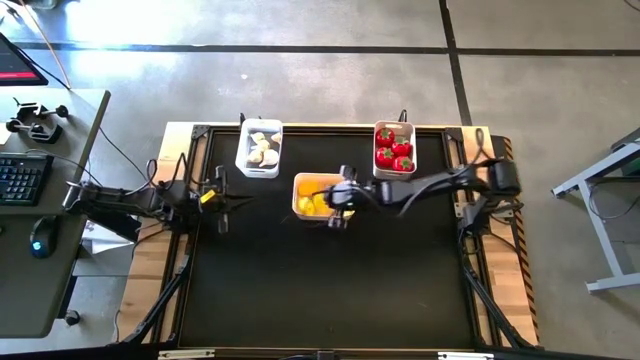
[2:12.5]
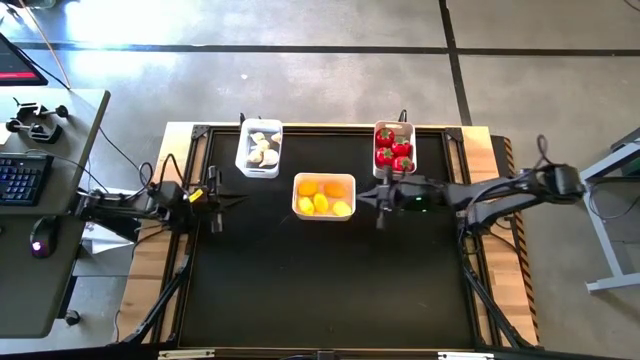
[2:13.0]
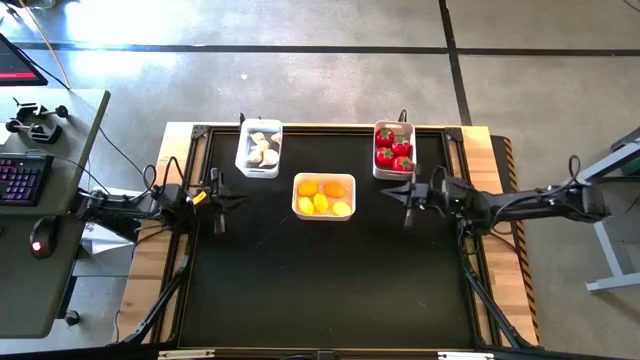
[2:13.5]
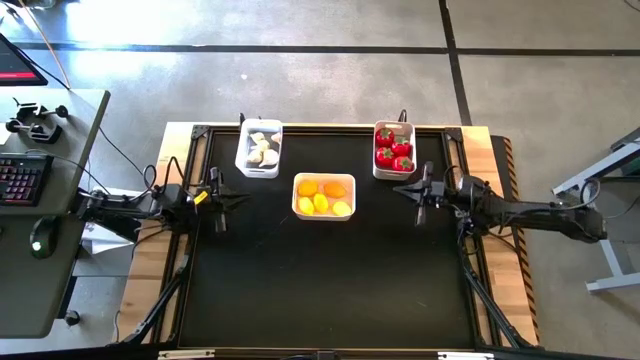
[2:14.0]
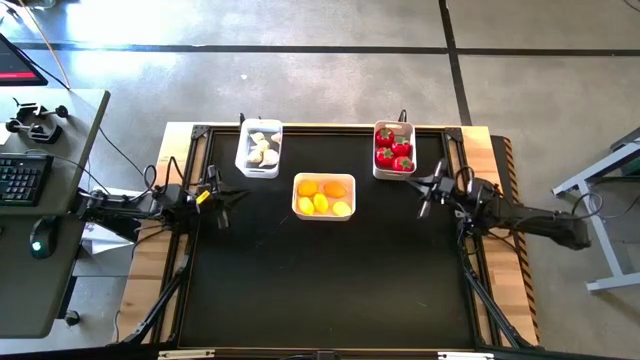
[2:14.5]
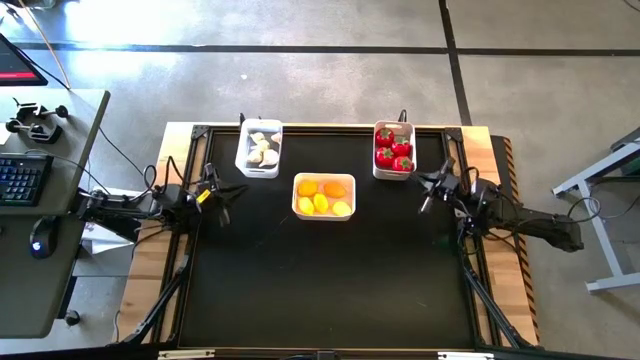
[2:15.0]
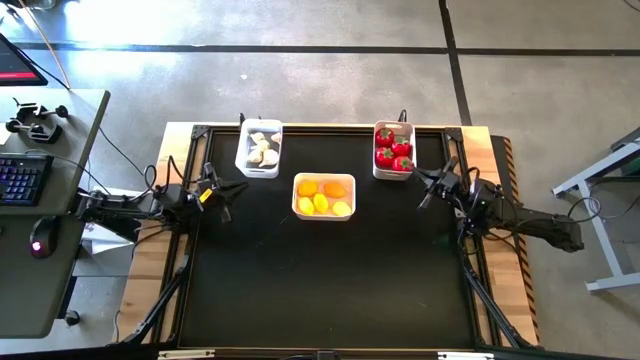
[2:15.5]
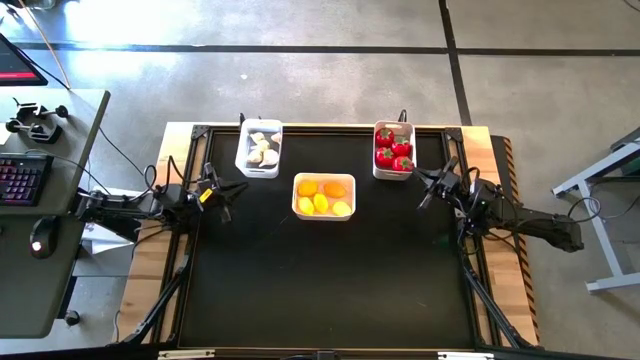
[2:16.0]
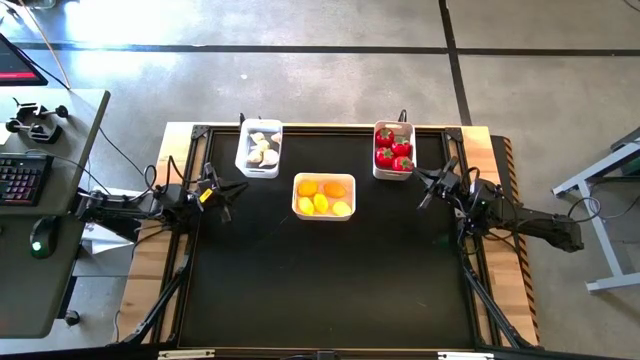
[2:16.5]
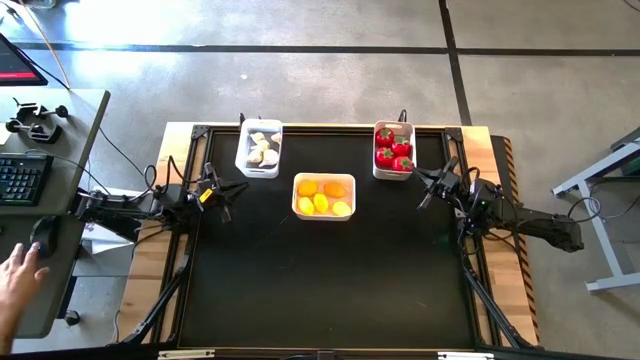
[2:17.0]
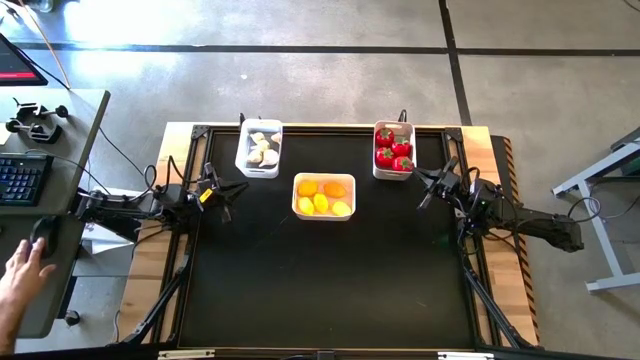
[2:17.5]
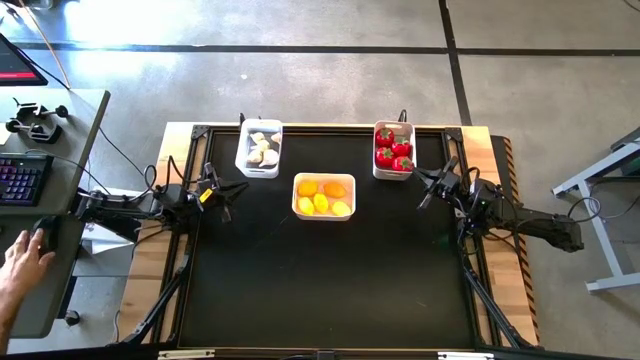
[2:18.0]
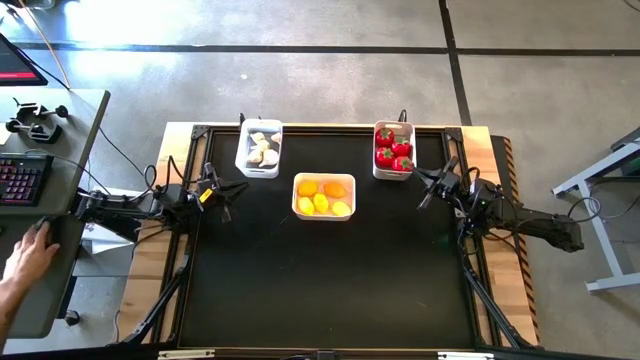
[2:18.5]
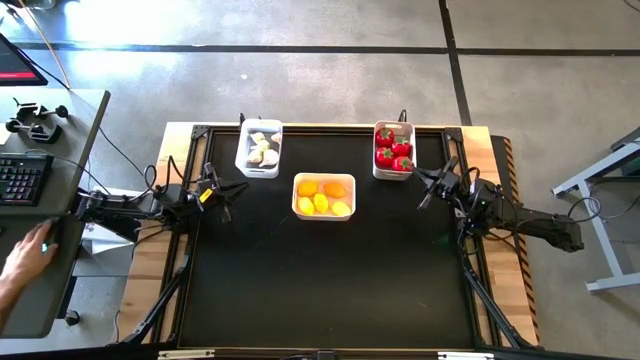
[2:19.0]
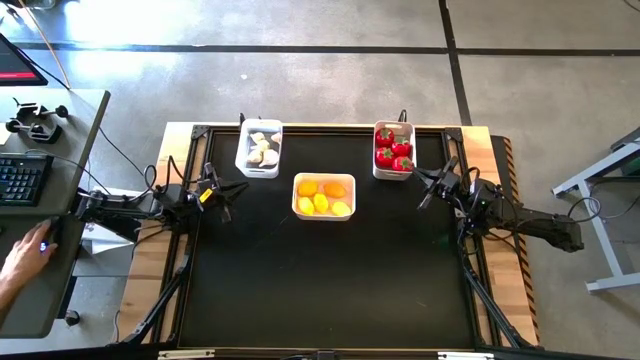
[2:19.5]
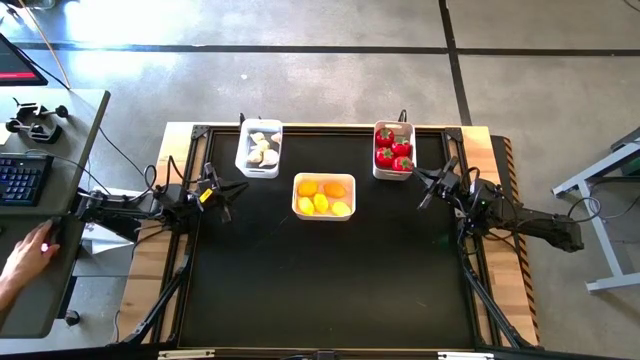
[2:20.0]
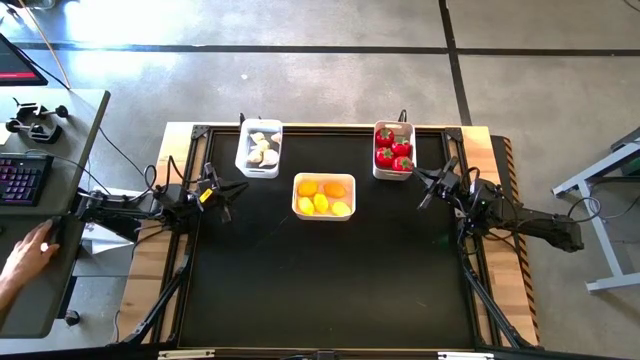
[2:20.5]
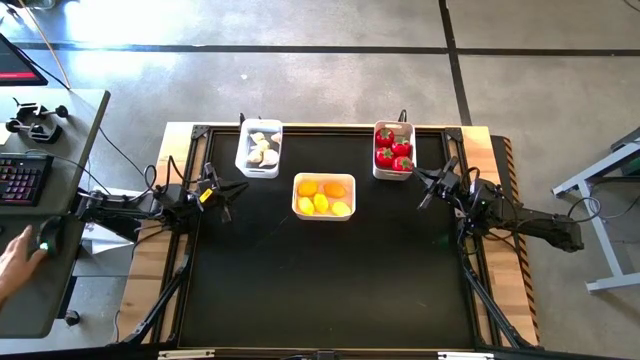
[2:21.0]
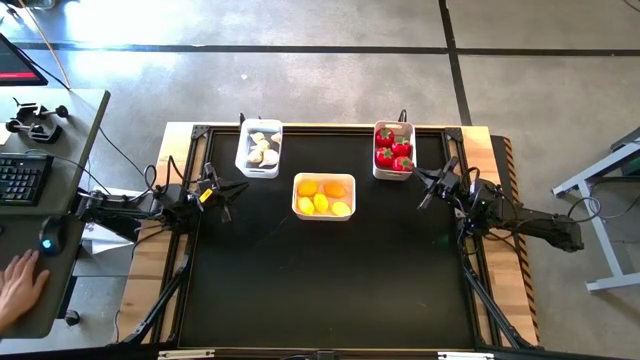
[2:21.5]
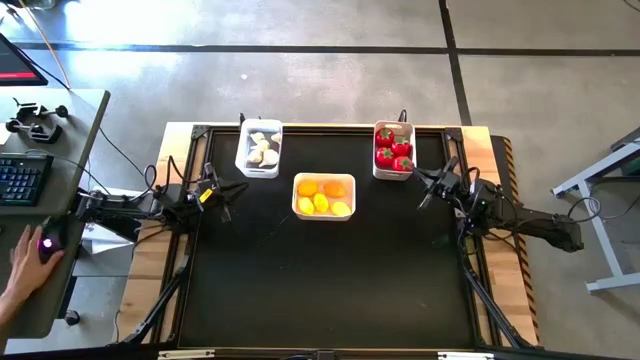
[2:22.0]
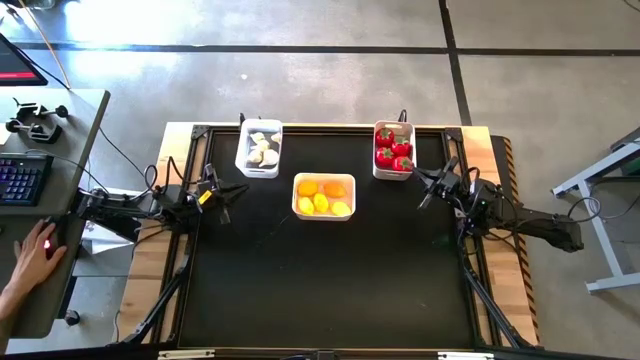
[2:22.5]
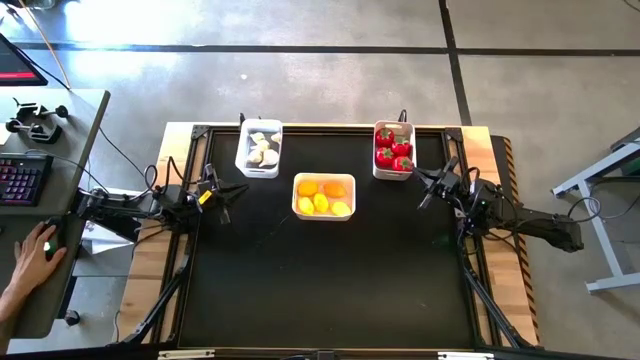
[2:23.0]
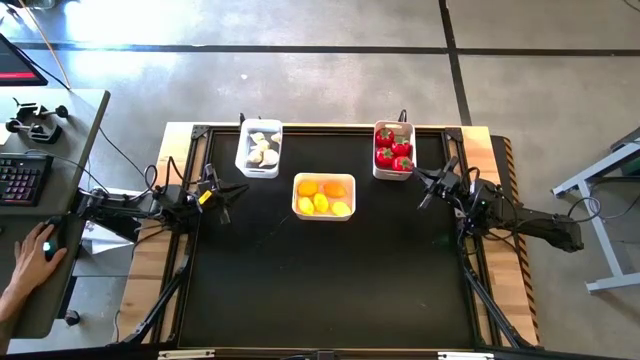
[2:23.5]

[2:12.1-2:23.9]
Task: Sort produce into baskets
Return to Home Position

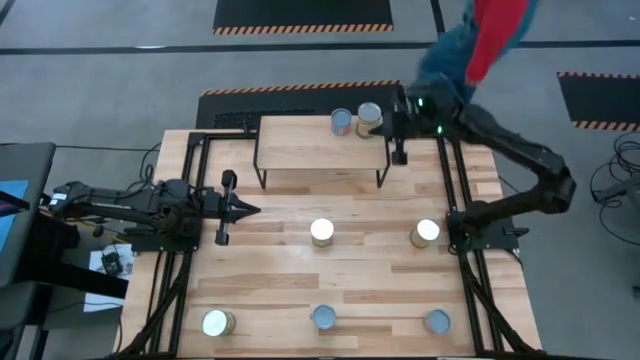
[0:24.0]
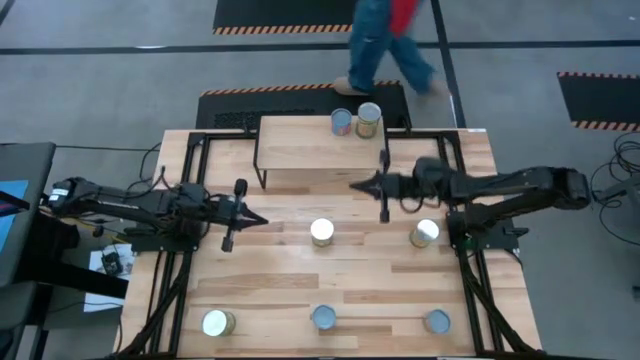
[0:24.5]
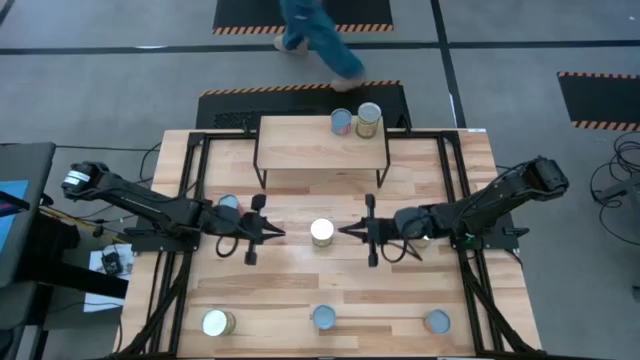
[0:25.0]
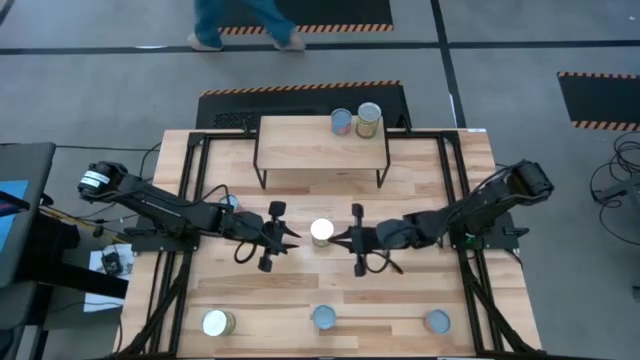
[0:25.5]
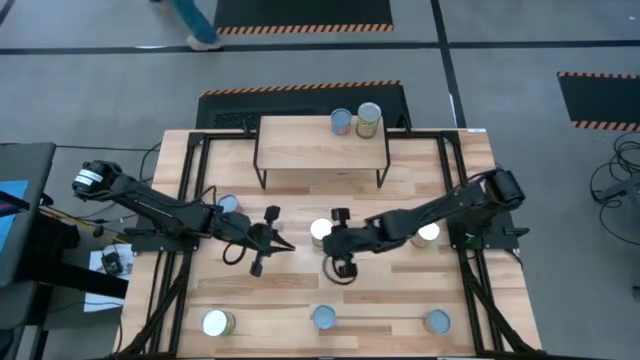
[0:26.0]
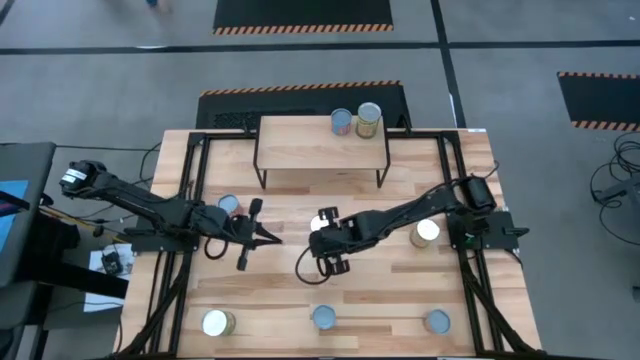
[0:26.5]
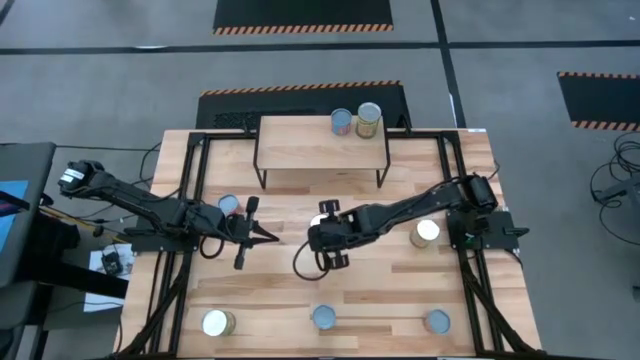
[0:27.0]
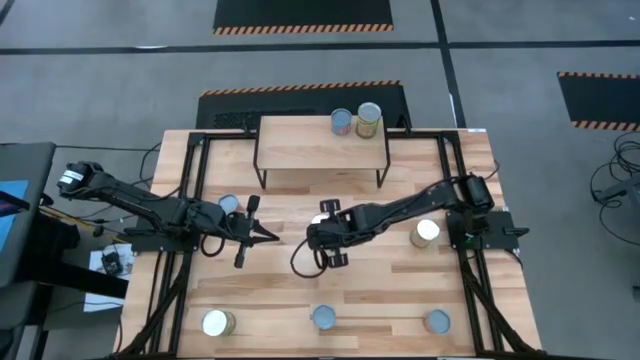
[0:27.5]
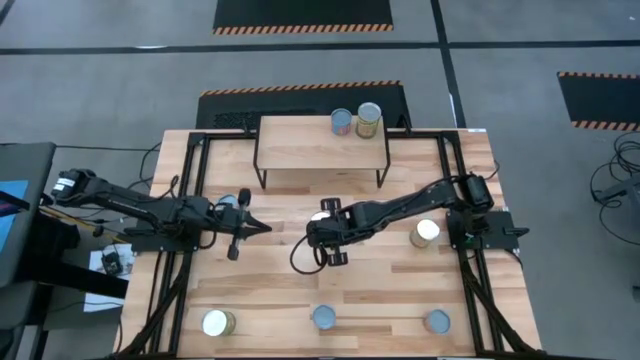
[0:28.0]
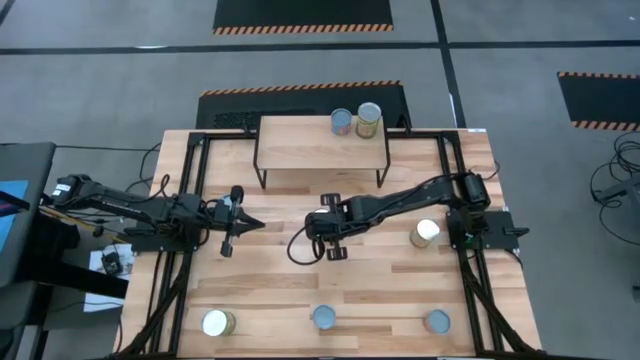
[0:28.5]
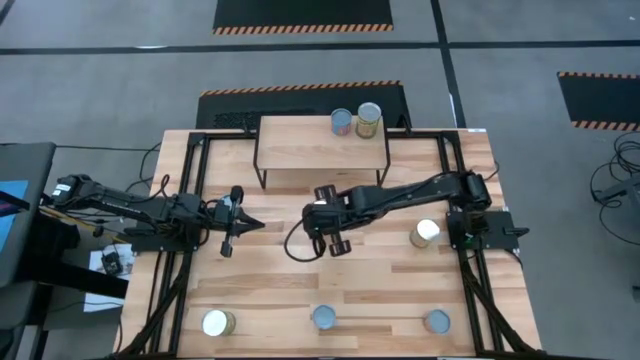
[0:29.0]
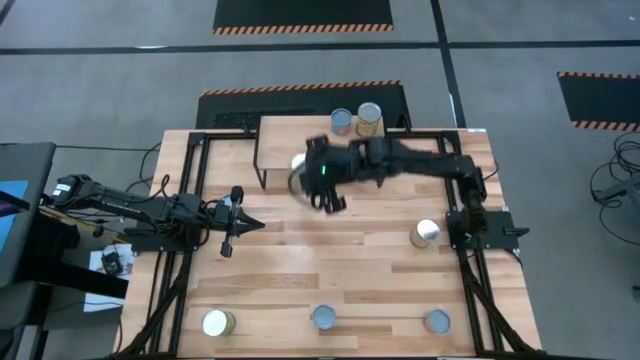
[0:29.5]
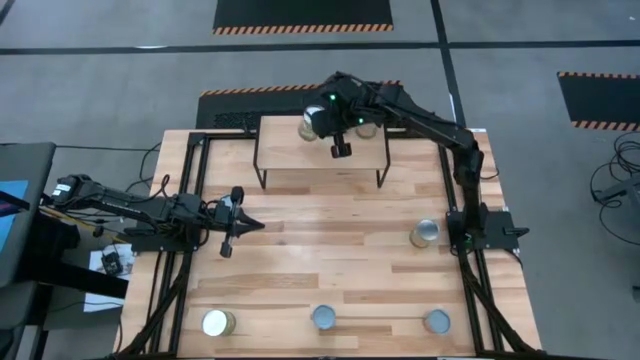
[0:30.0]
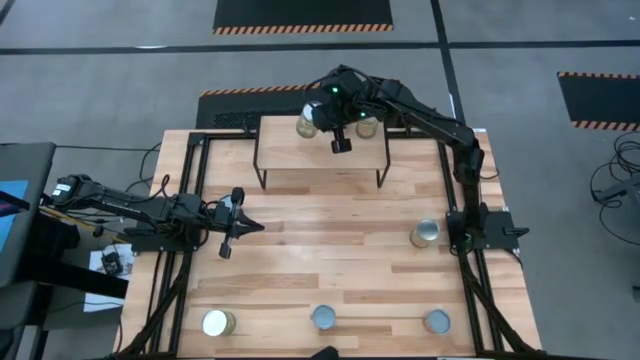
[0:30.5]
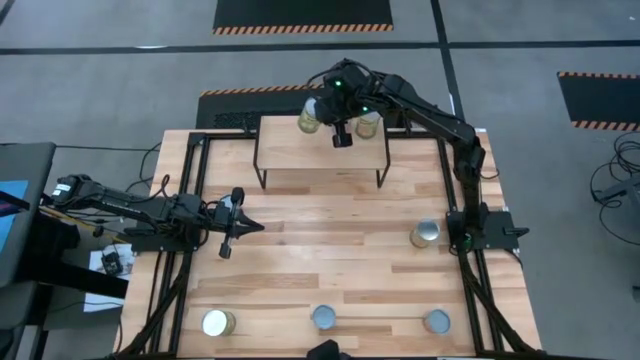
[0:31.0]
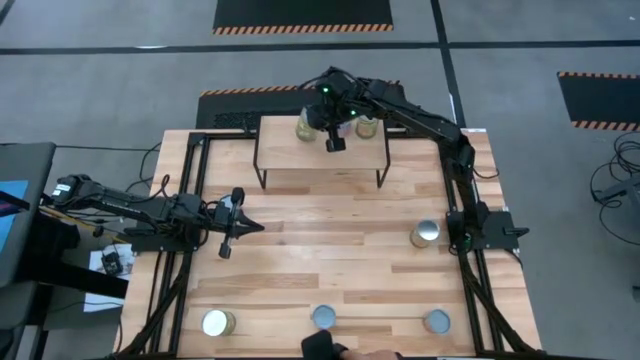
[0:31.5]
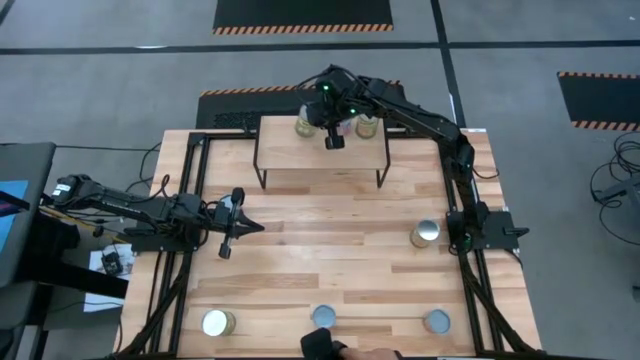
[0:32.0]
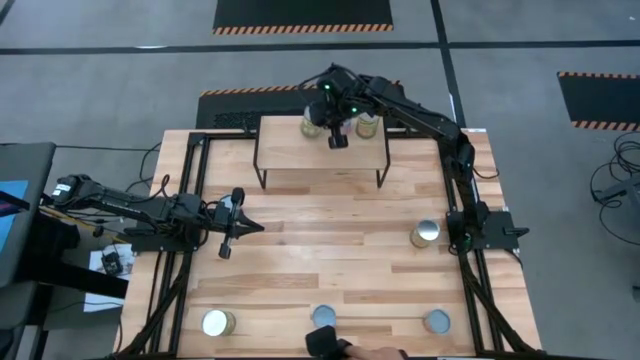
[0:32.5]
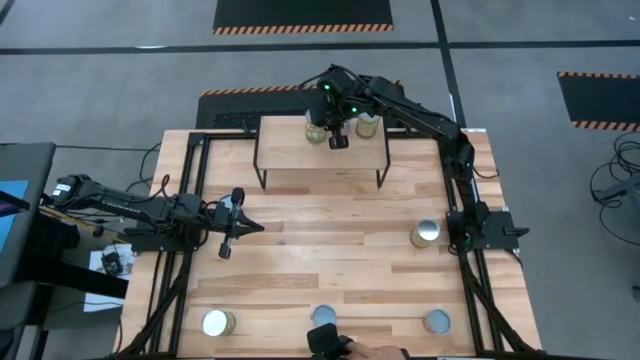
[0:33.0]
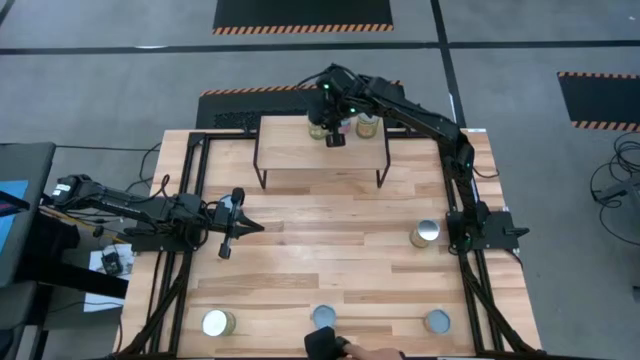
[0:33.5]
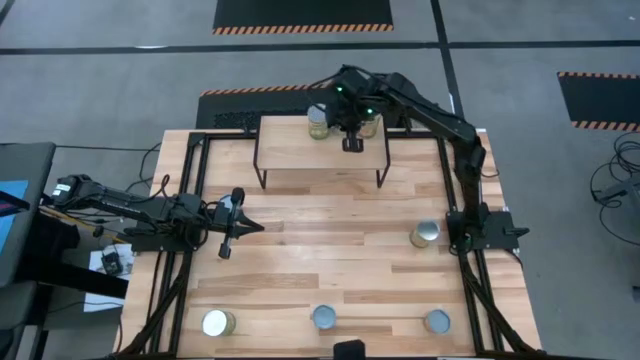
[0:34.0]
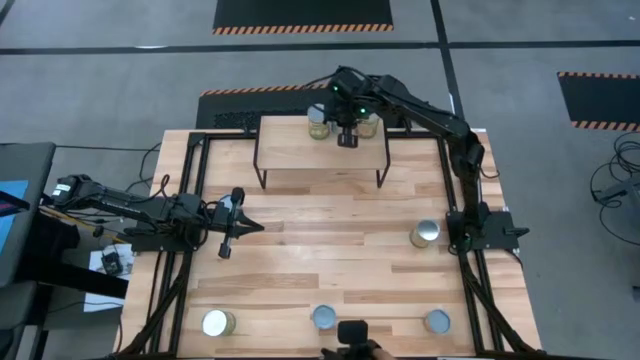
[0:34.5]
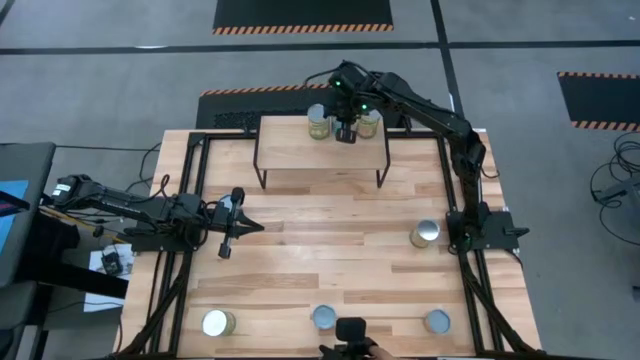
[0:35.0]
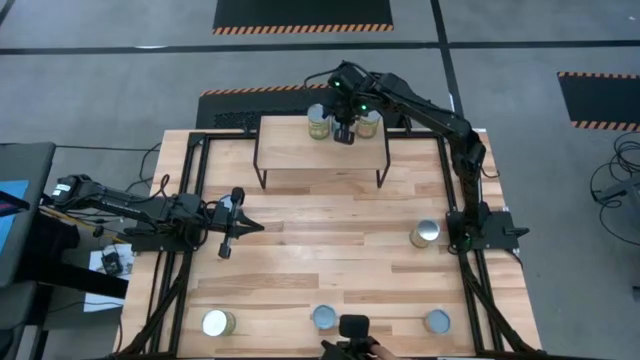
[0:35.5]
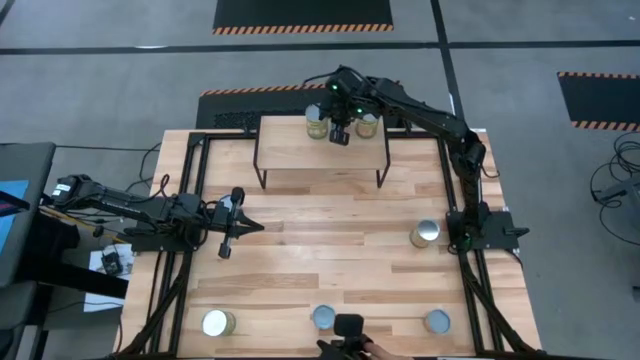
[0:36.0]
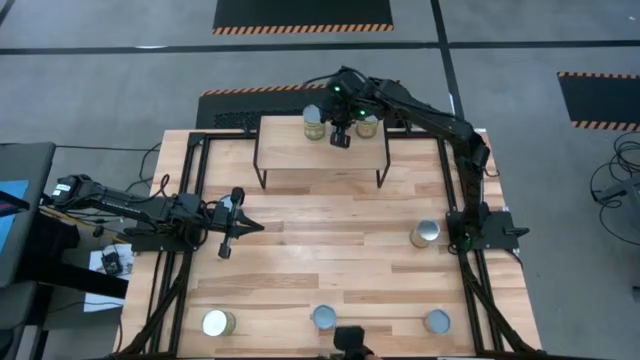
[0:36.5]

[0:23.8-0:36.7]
Task: Pick and place cans onto a shelf
Put the center light green can on the shelf
